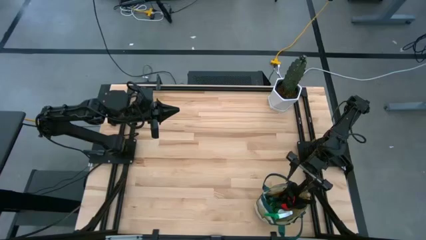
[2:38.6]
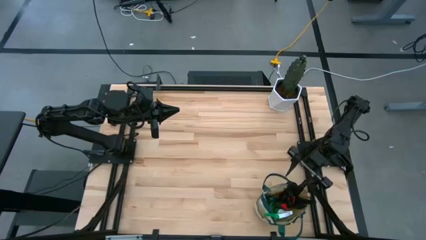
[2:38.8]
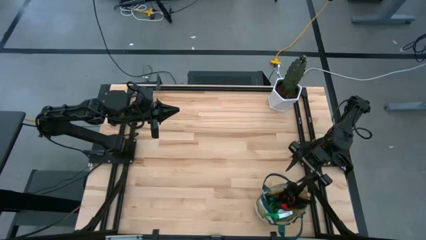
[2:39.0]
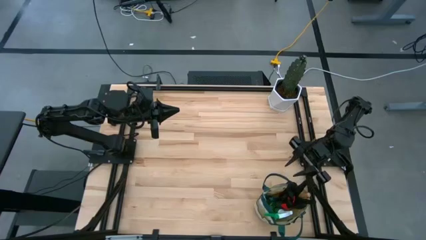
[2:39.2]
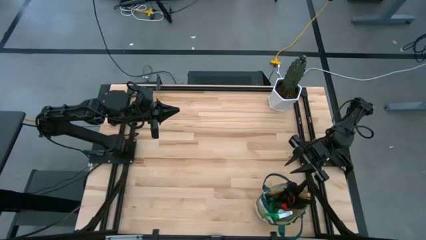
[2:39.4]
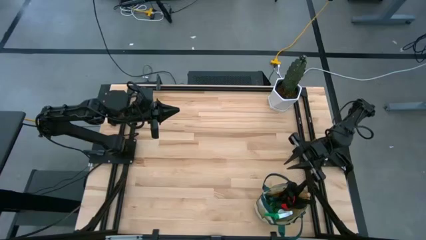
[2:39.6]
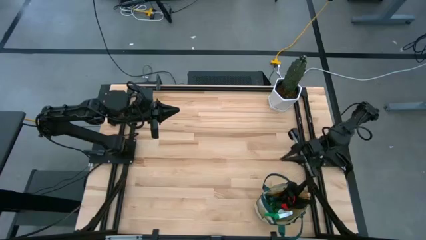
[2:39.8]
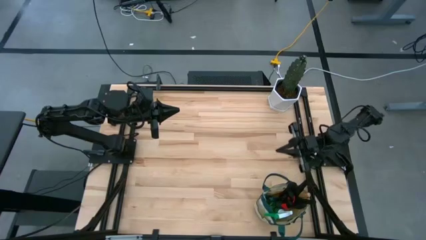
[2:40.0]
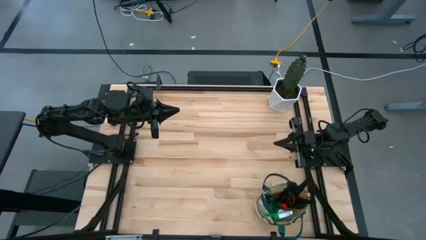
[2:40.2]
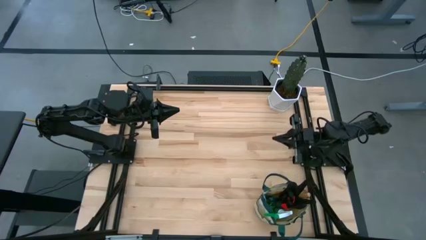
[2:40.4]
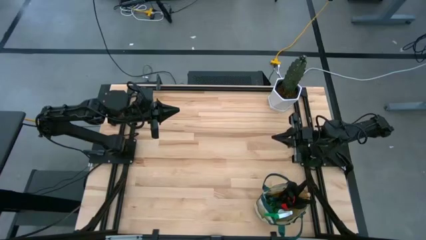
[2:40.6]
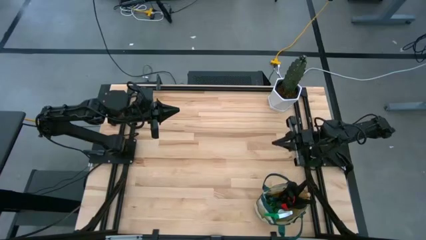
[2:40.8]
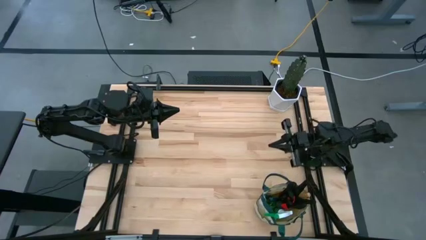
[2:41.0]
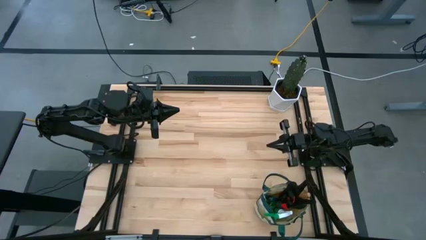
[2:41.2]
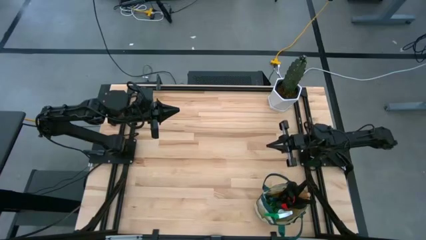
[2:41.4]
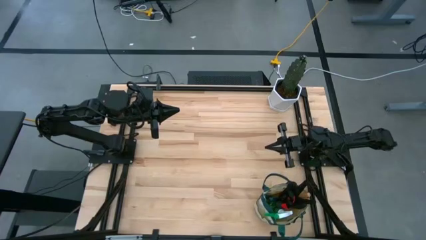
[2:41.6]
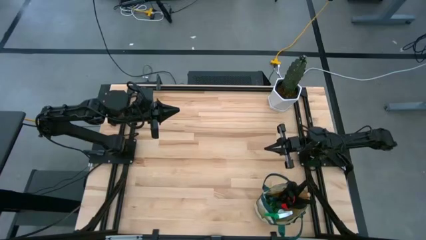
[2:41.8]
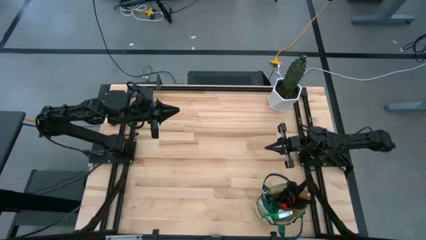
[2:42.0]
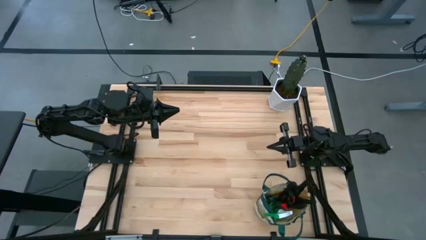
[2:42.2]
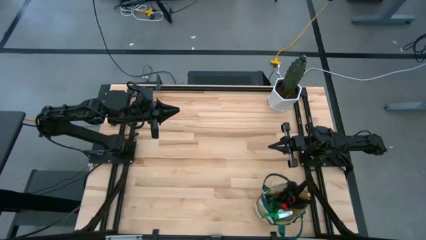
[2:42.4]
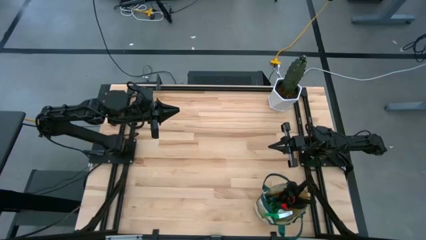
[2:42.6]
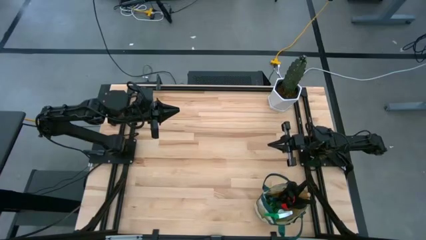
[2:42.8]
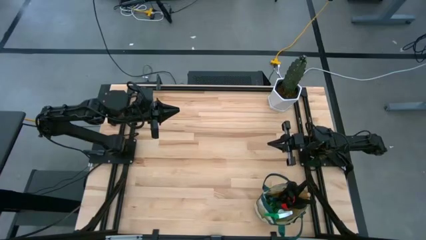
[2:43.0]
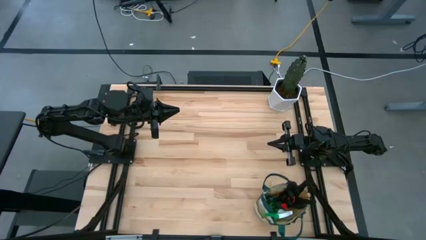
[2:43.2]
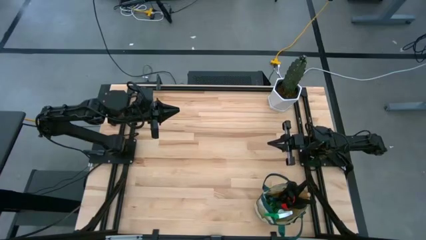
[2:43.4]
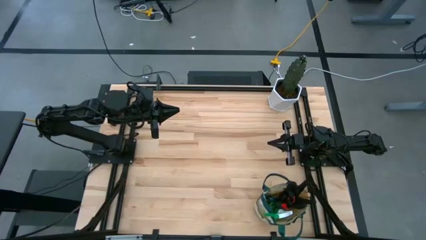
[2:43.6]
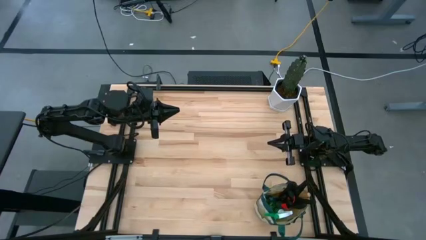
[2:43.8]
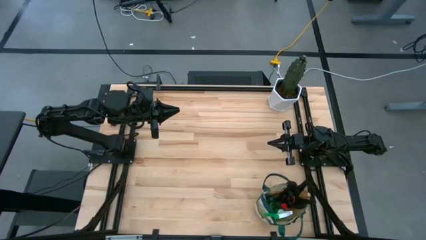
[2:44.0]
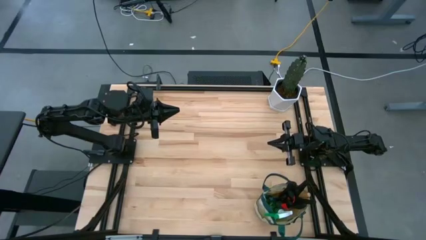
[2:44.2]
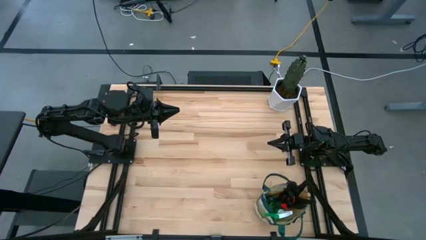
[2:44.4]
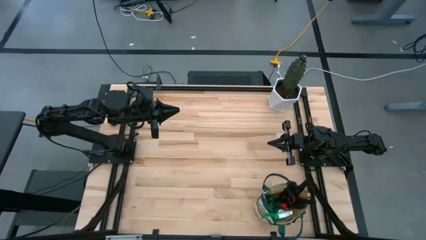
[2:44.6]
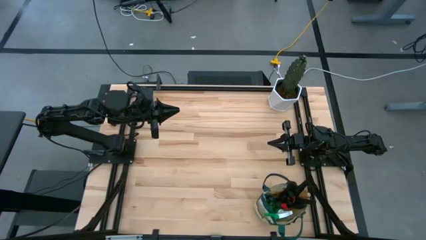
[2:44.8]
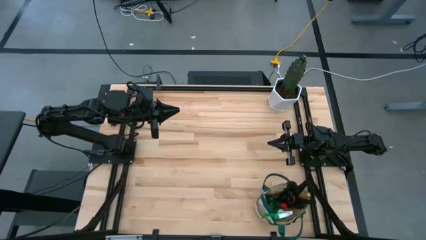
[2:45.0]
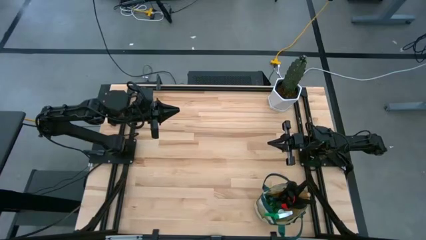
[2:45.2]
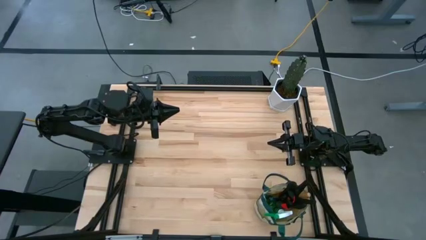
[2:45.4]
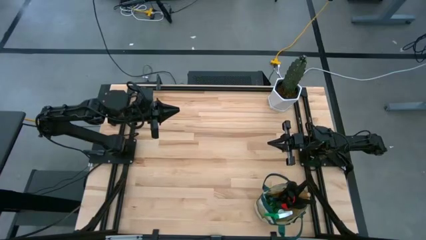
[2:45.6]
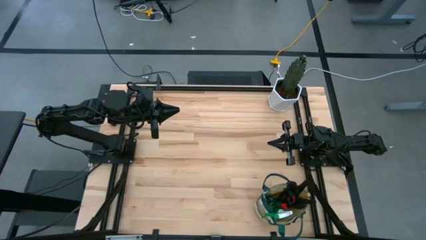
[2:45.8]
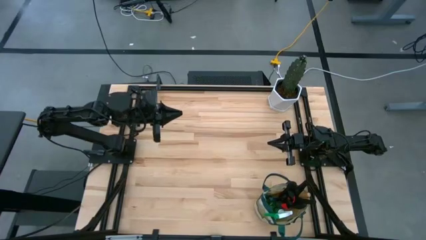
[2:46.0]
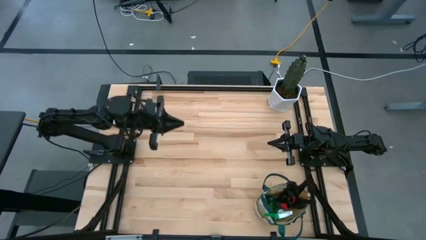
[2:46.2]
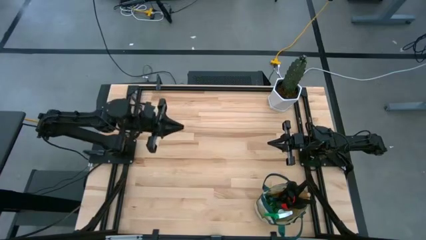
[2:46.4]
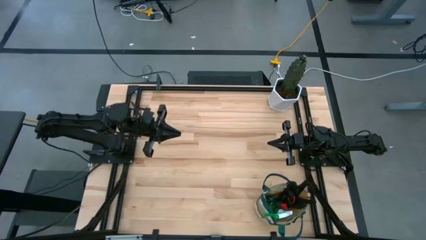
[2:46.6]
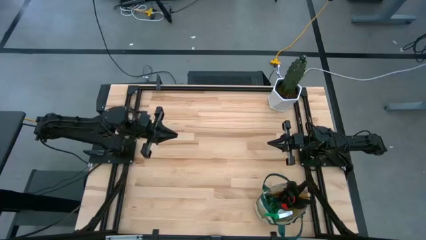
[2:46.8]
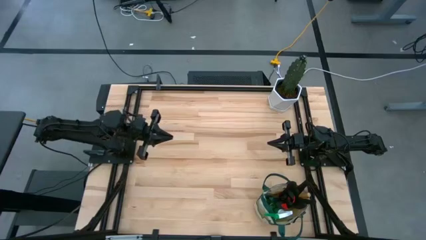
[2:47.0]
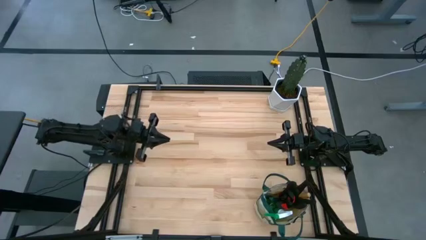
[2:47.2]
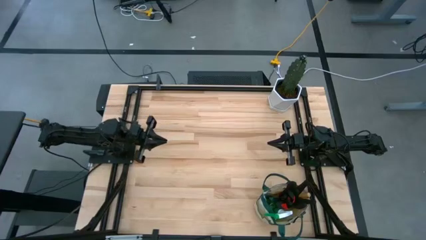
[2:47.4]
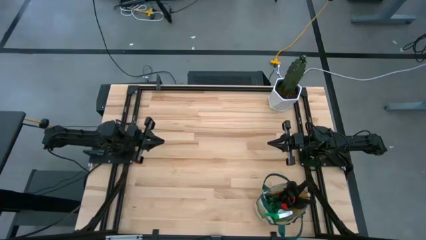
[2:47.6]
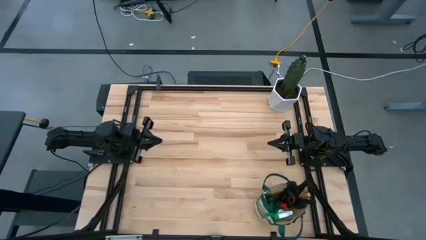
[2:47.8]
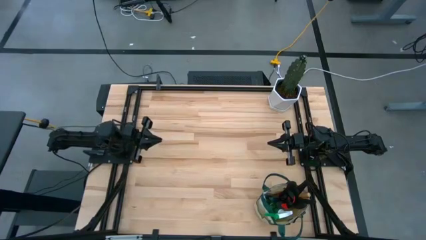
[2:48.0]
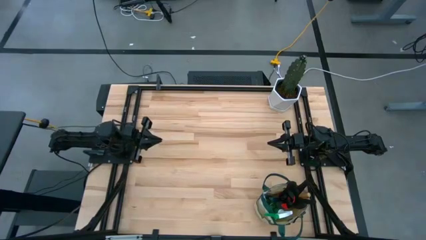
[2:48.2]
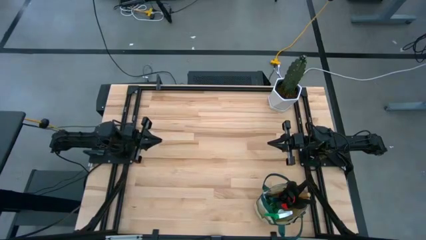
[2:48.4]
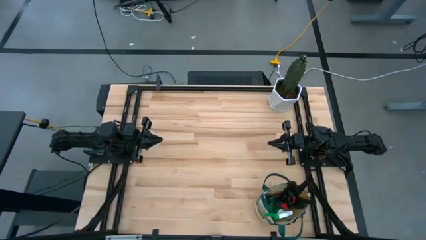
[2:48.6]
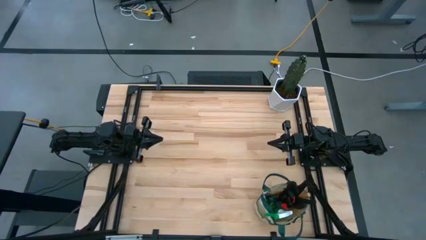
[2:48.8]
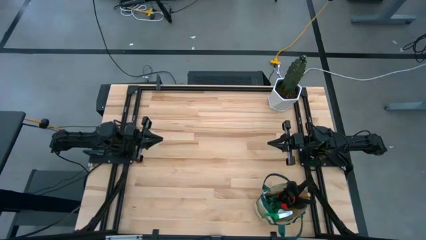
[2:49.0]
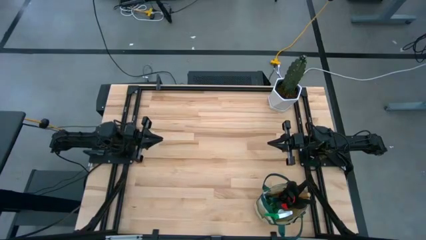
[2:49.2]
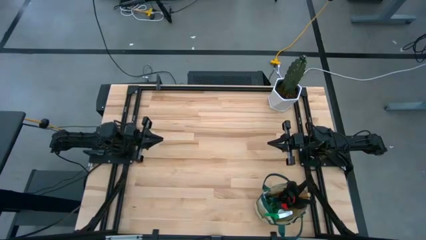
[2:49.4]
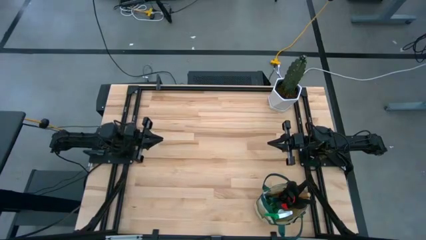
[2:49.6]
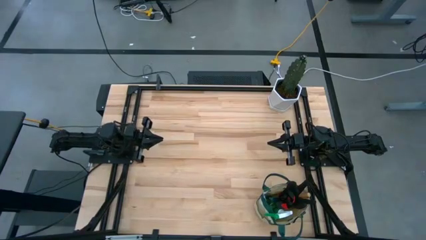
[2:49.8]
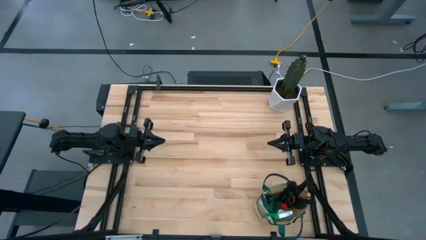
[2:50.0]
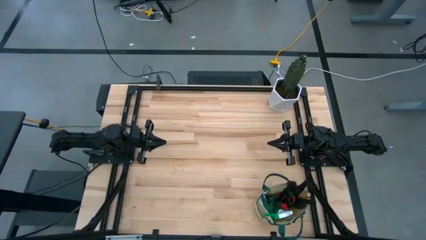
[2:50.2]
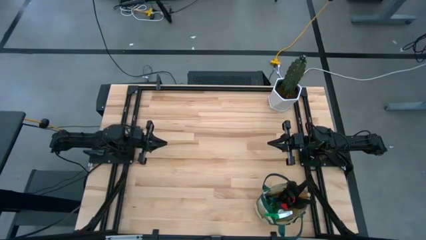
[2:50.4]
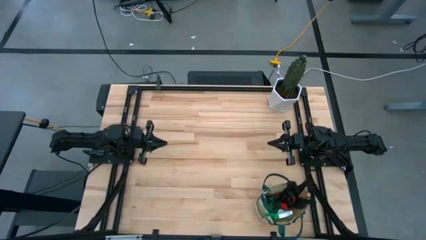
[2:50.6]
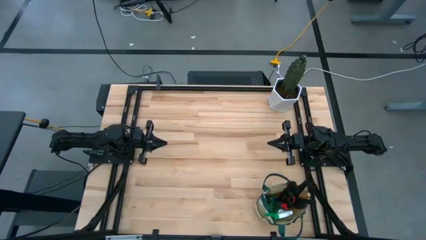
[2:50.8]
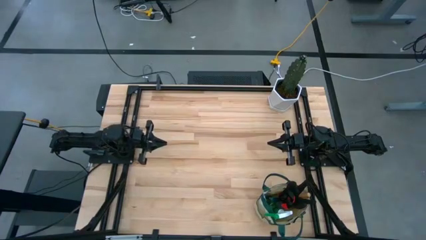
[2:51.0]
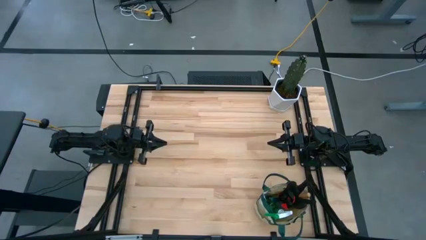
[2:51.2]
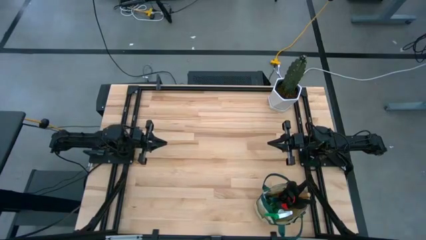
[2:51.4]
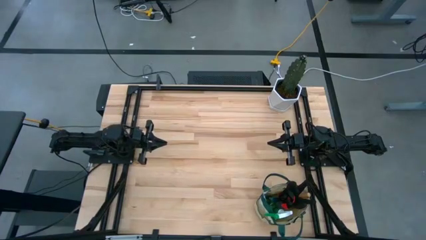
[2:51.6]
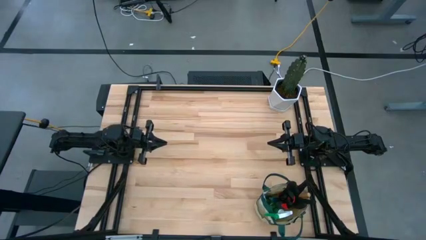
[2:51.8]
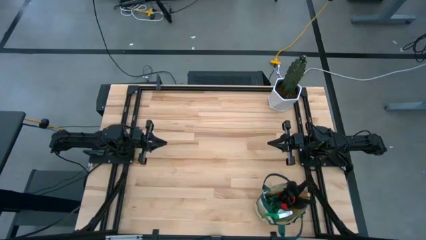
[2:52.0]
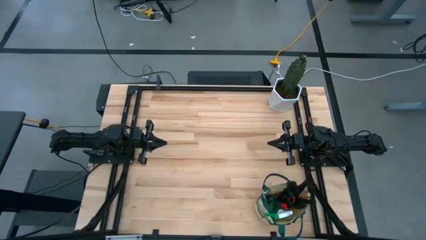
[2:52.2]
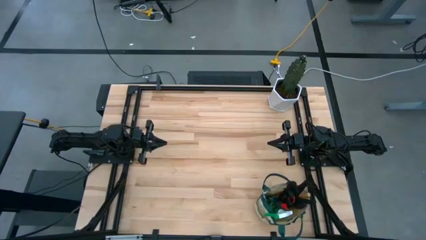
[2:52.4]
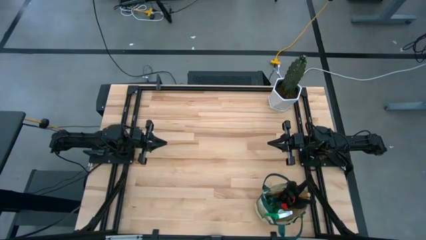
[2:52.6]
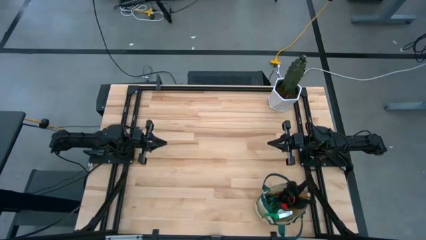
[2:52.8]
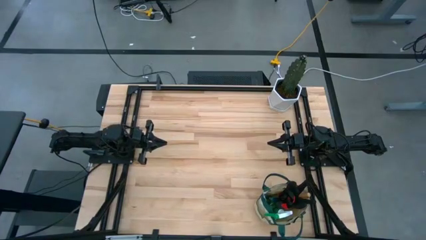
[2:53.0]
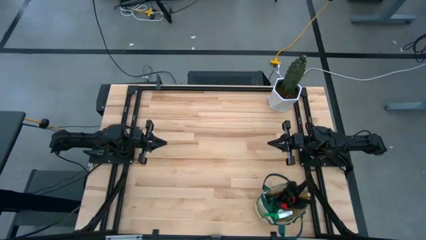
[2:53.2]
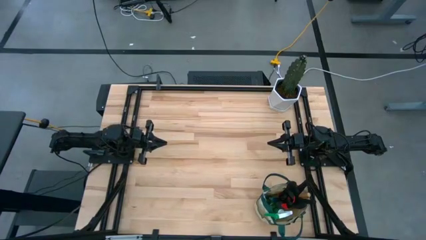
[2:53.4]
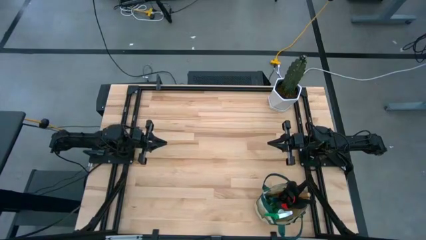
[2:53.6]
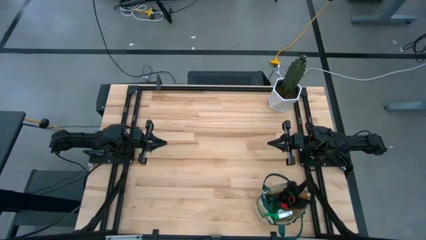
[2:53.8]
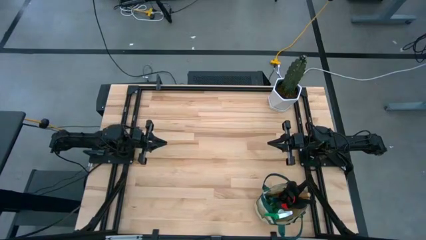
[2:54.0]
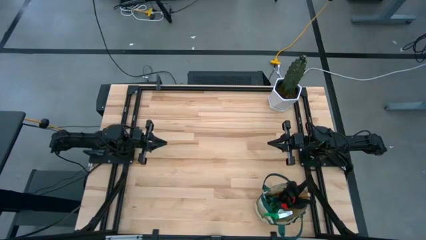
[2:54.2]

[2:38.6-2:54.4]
Task: Pick & Place Garden tools in Gardening bag
Return to Home Position

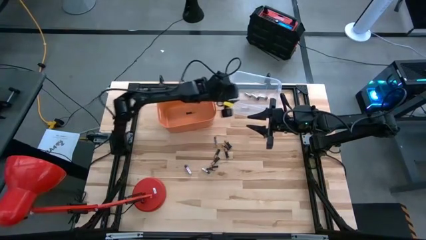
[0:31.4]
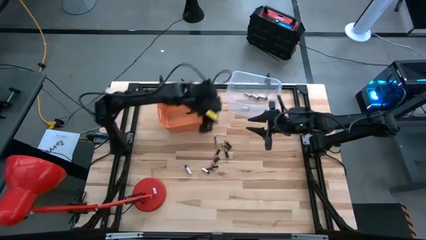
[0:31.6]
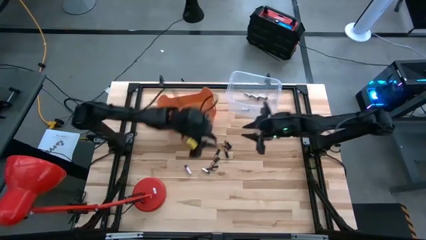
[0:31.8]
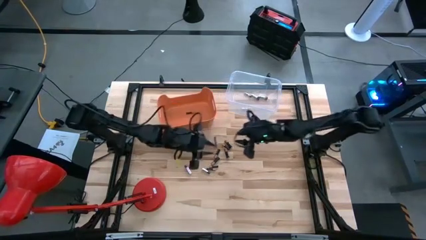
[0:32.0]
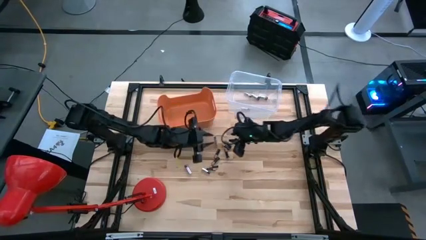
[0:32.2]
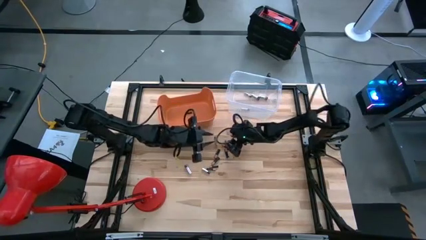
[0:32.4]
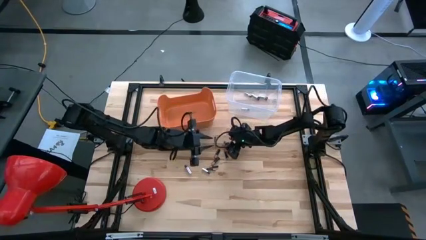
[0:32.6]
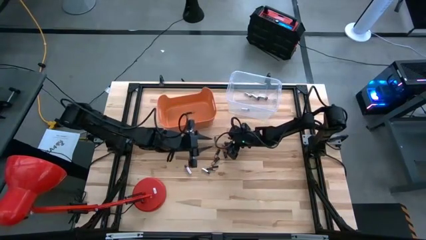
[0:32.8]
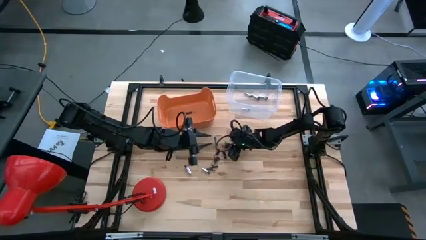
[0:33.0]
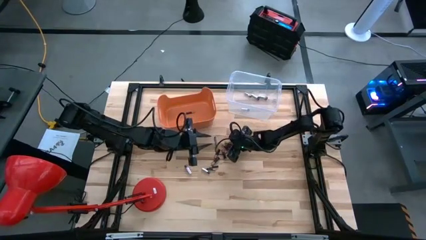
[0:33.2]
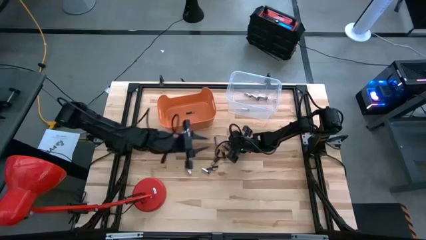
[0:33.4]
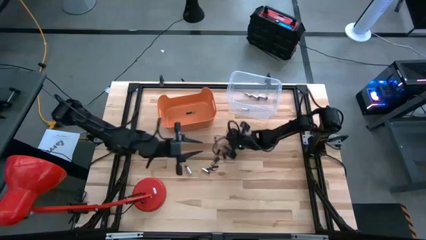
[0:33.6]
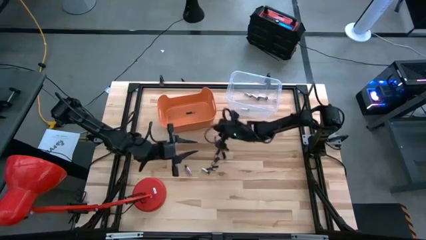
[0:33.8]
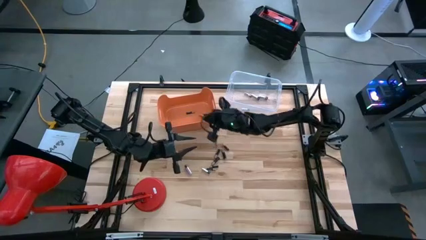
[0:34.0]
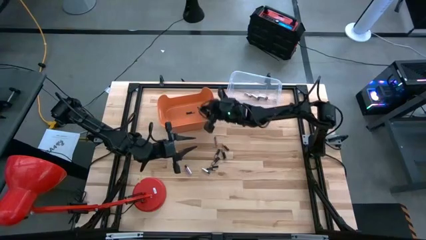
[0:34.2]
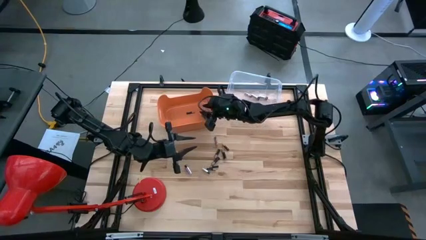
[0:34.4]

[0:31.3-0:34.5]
Task: Sort batteries
Put the black battery into the orange bin
